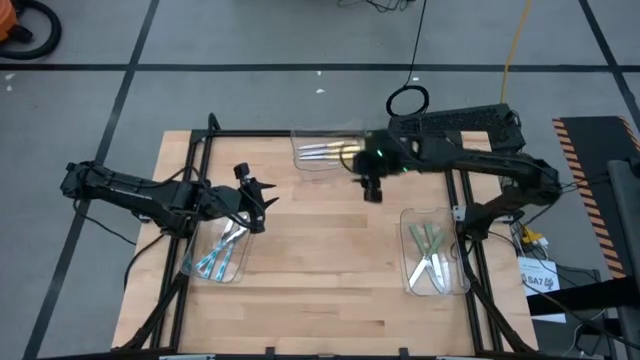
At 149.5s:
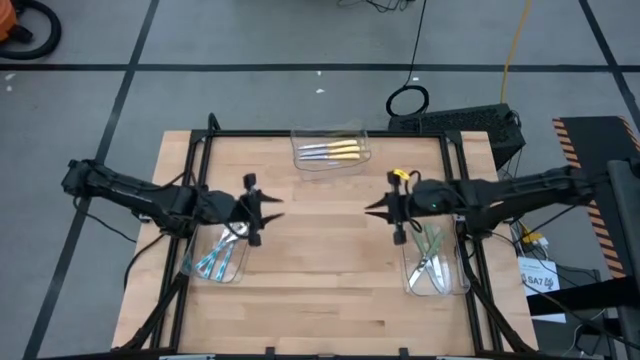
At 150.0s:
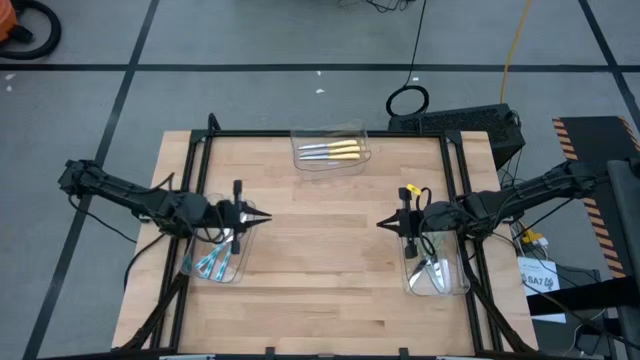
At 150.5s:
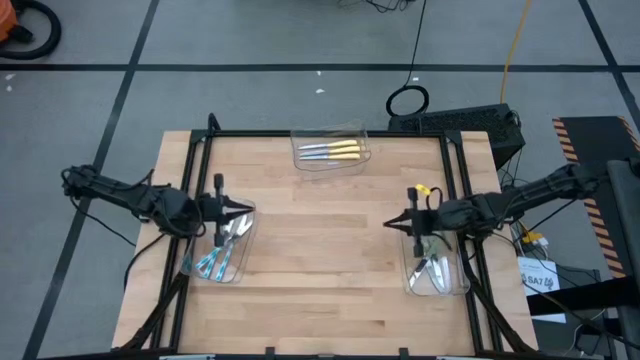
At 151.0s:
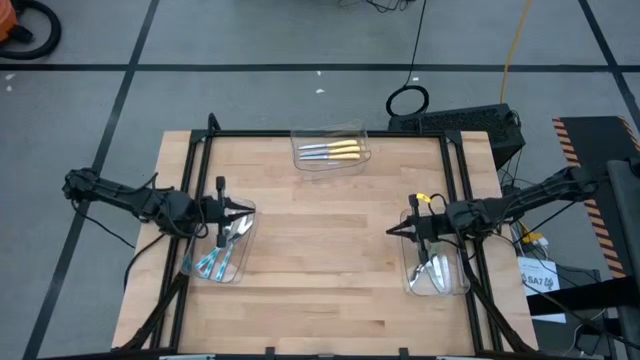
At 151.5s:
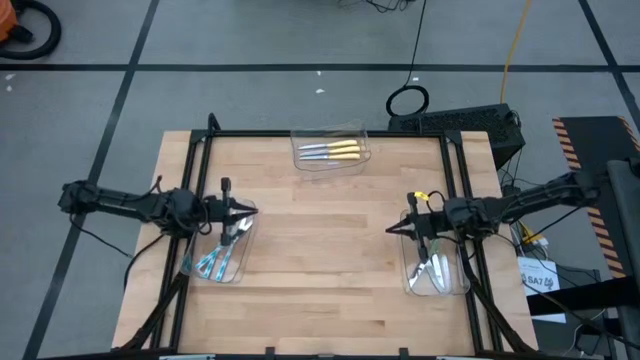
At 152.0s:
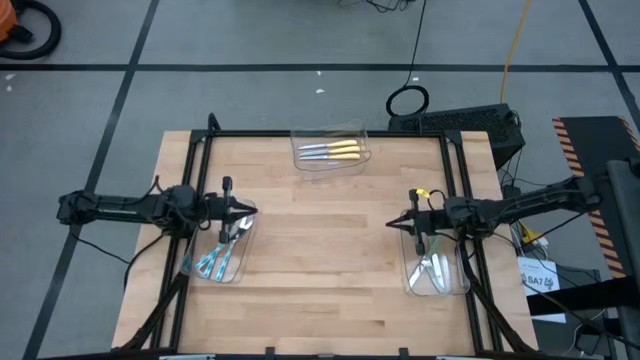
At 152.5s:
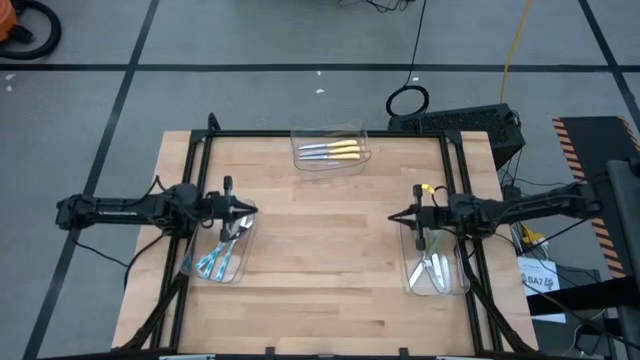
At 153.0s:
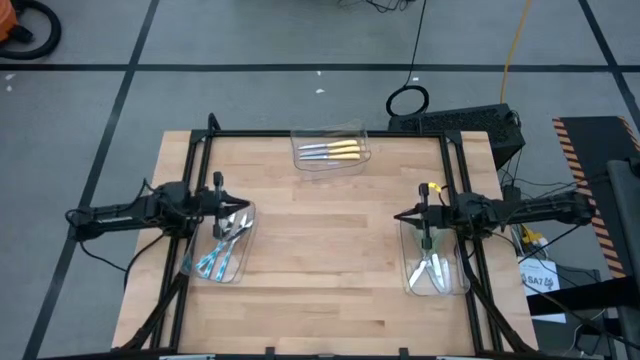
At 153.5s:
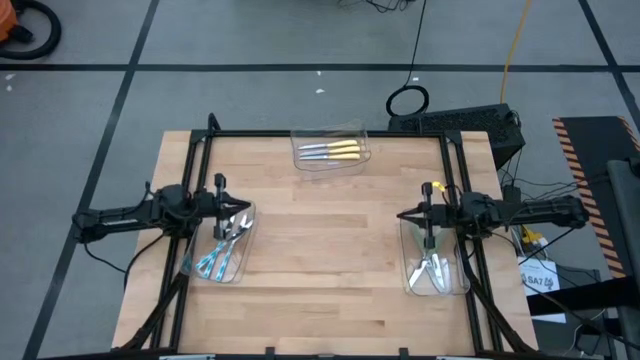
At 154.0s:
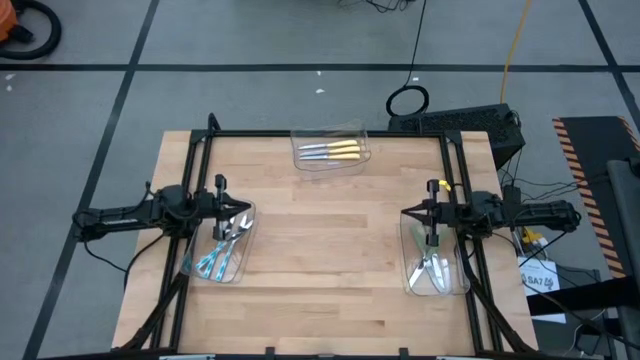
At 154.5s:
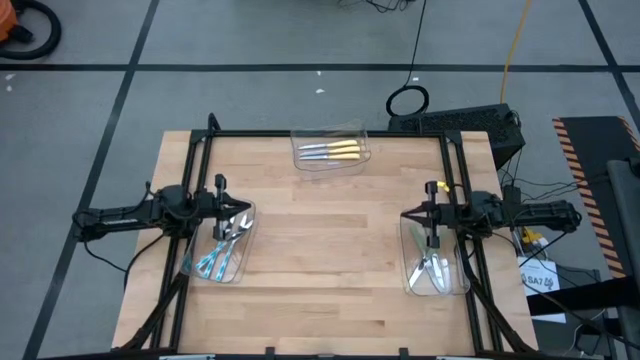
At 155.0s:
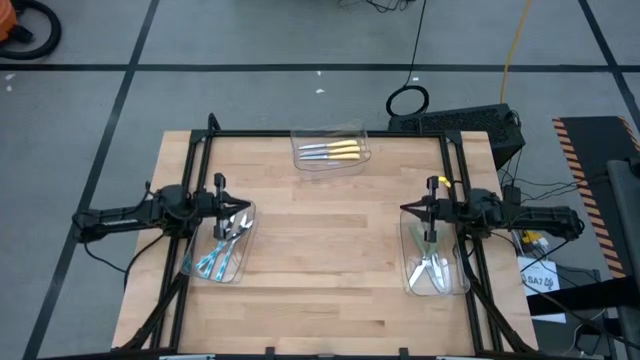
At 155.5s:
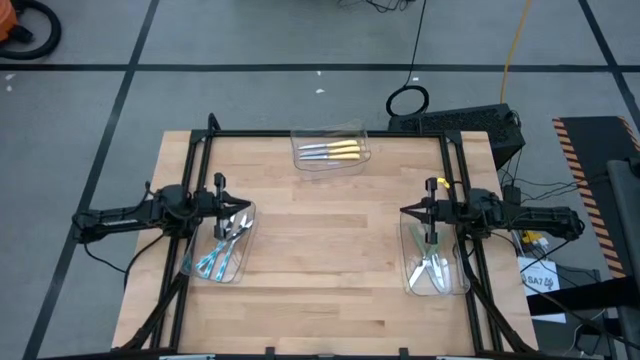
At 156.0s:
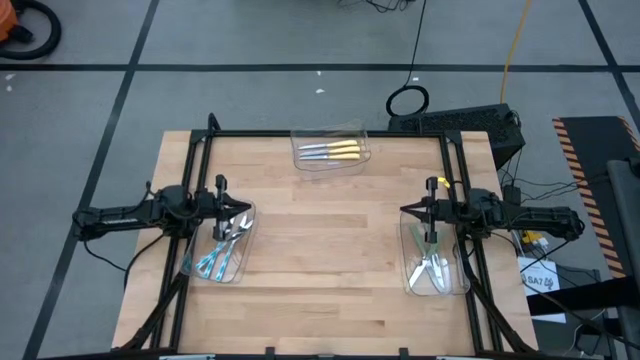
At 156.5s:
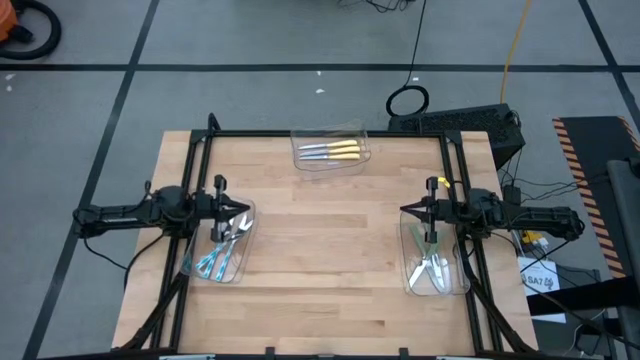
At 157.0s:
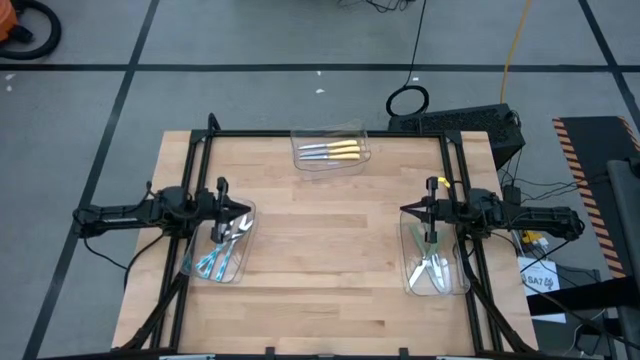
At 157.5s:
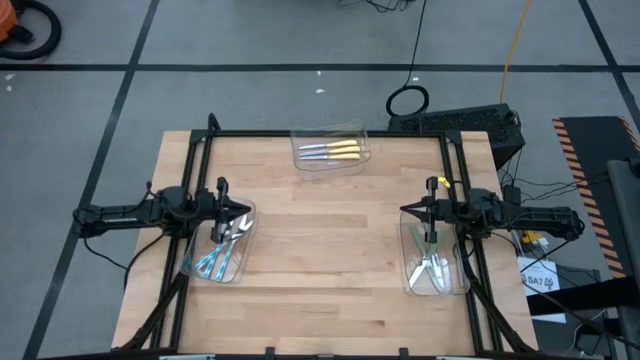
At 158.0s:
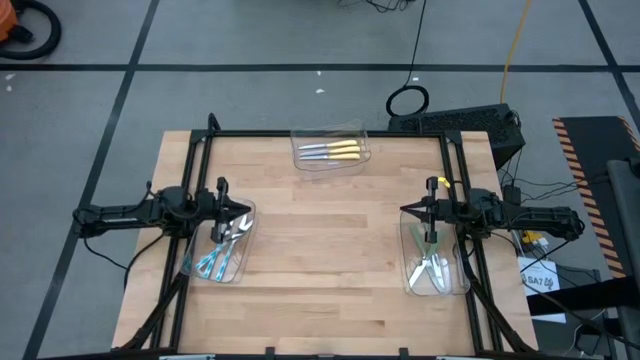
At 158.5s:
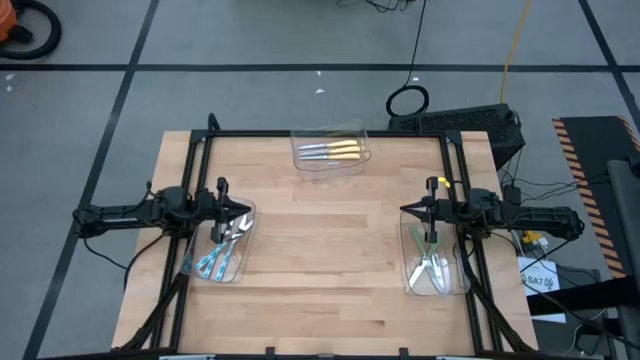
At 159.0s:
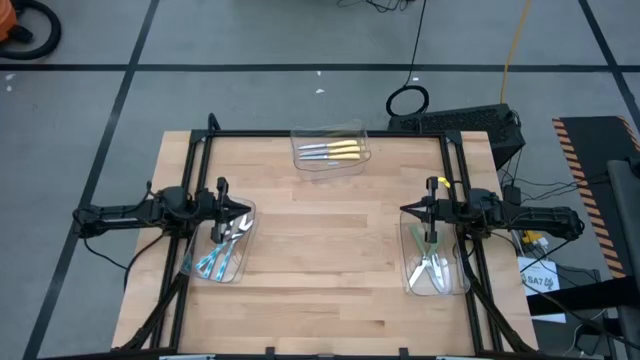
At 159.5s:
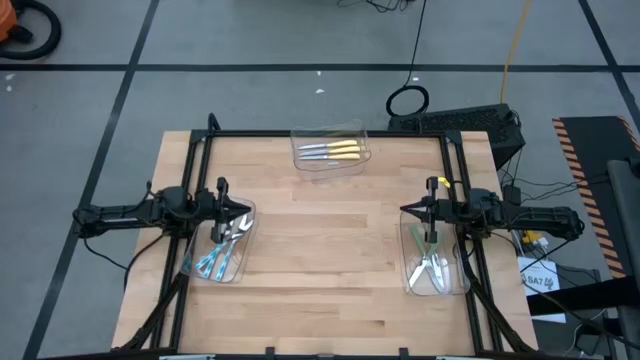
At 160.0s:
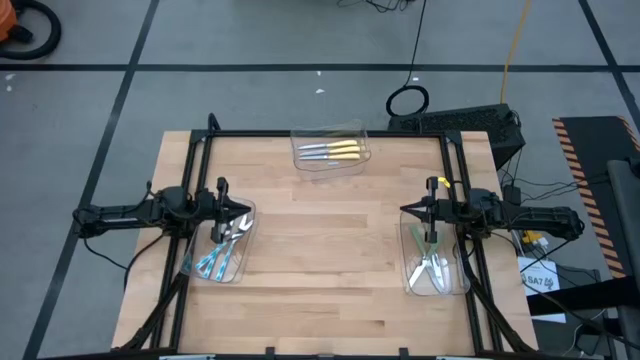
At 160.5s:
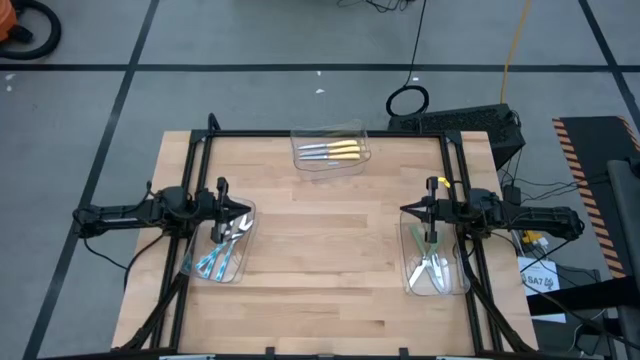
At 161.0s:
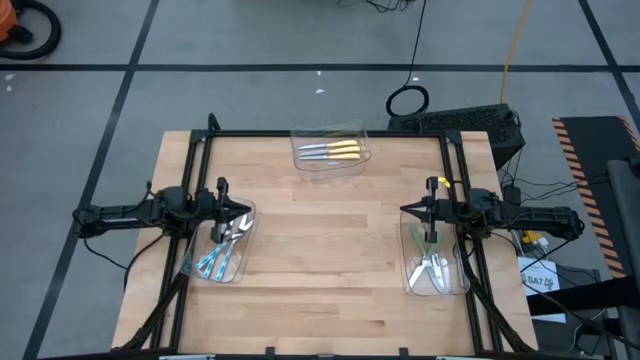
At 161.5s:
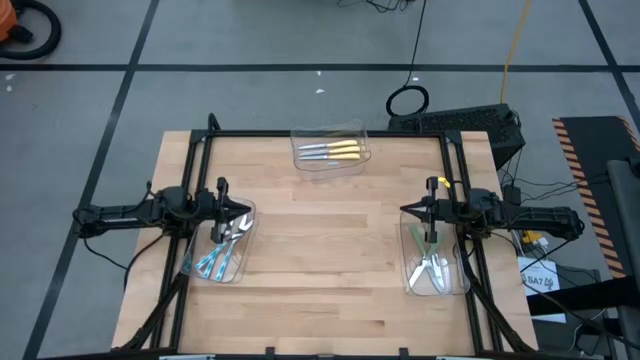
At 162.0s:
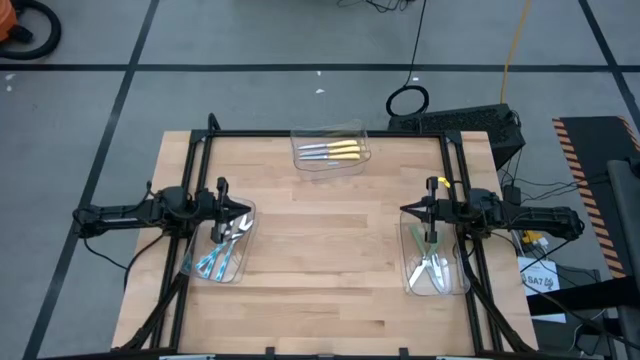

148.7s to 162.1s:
Task: Sort silverware by color (type)
Return to Home Position

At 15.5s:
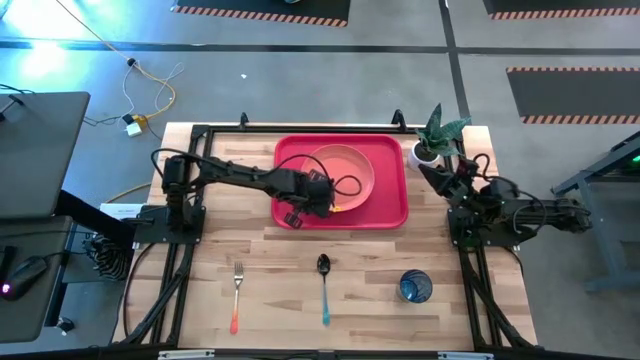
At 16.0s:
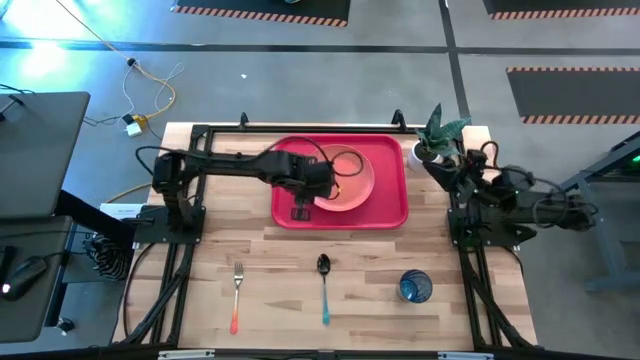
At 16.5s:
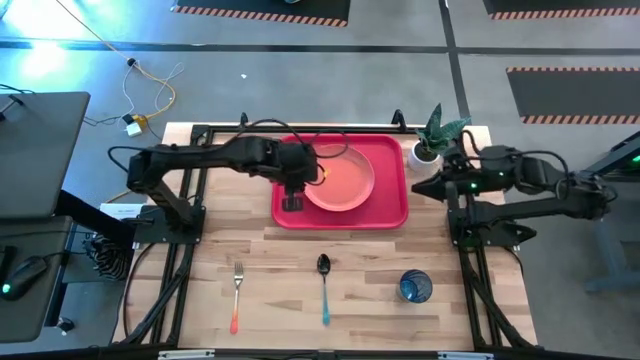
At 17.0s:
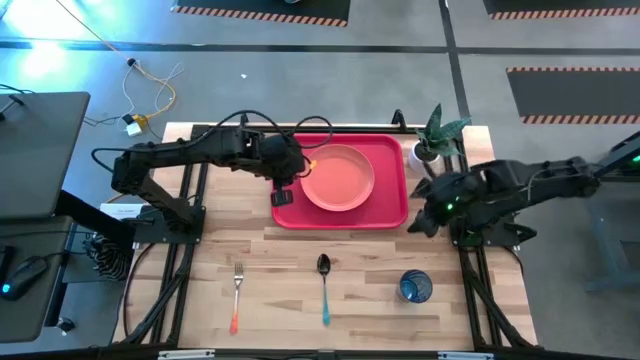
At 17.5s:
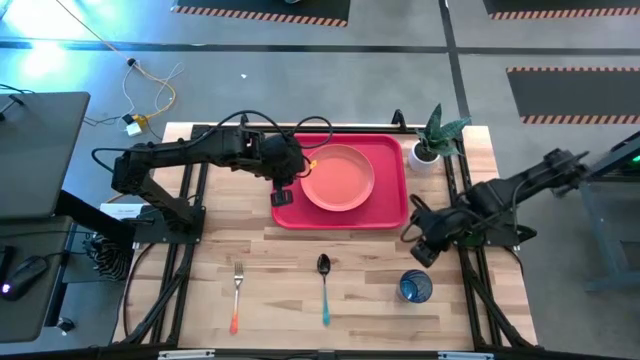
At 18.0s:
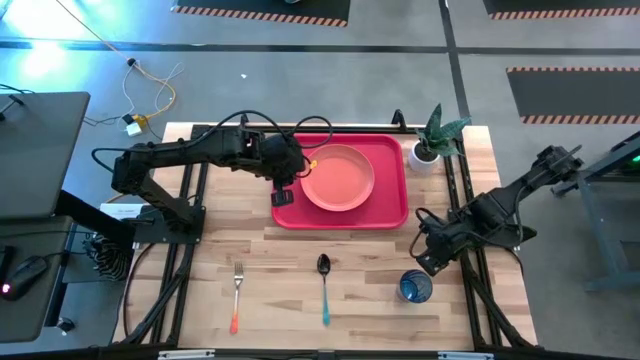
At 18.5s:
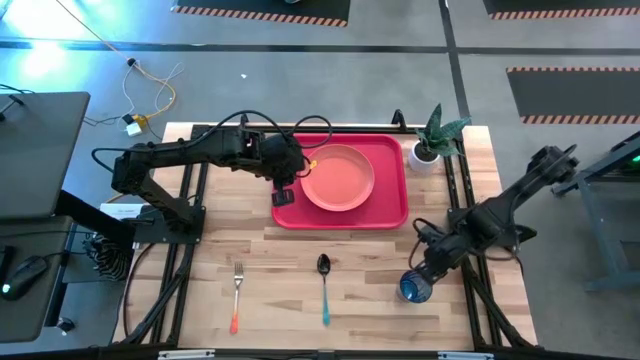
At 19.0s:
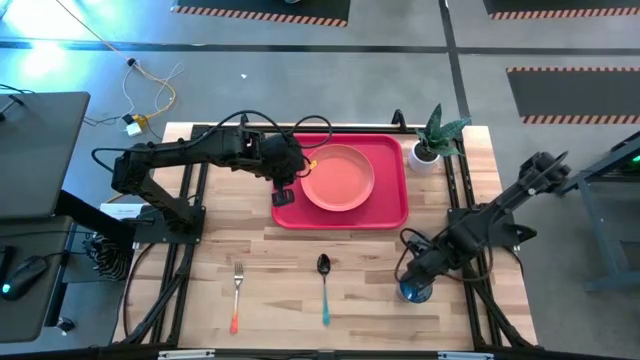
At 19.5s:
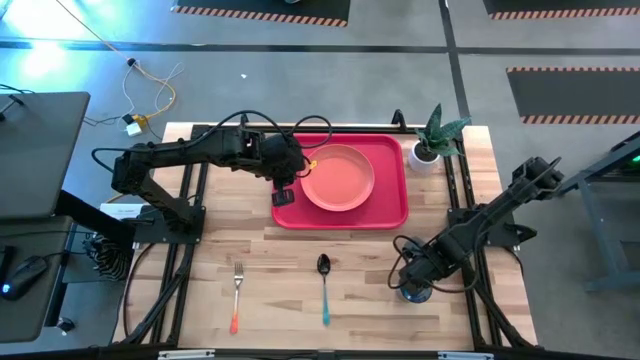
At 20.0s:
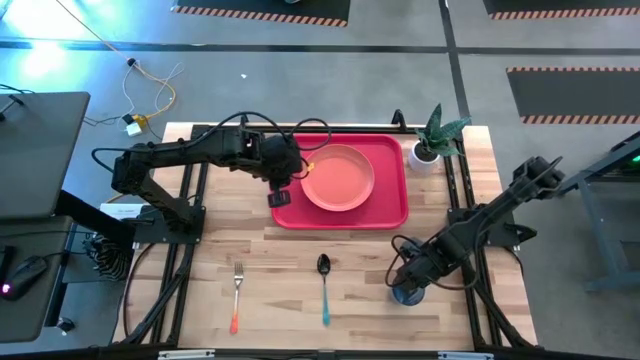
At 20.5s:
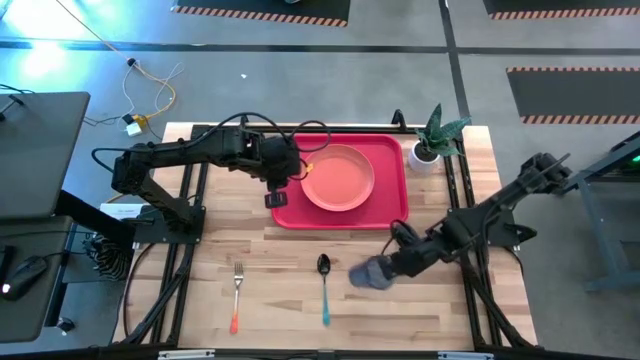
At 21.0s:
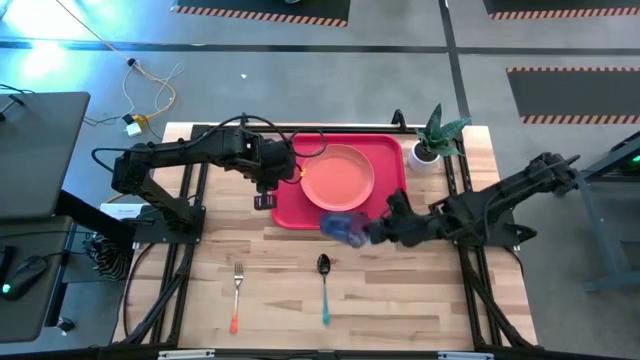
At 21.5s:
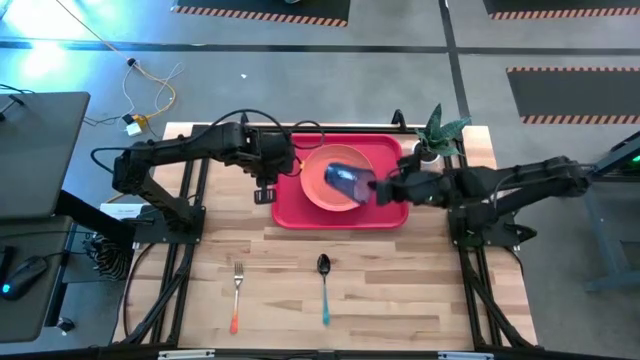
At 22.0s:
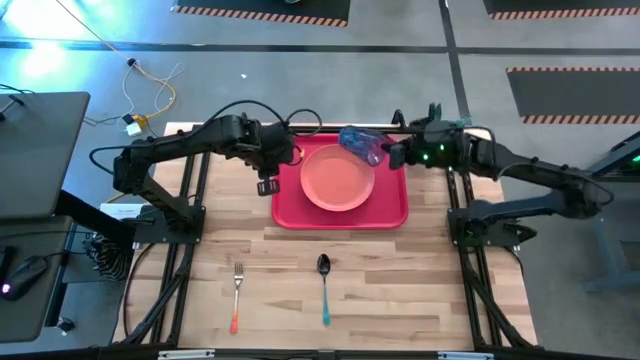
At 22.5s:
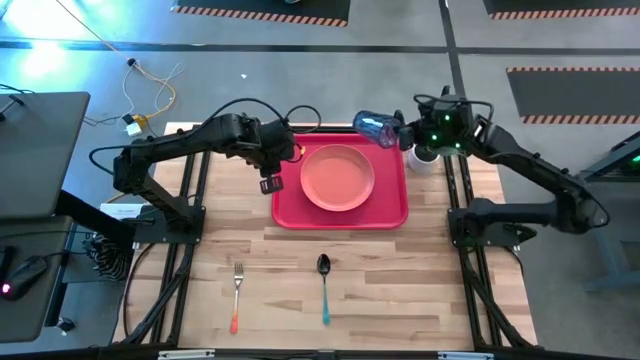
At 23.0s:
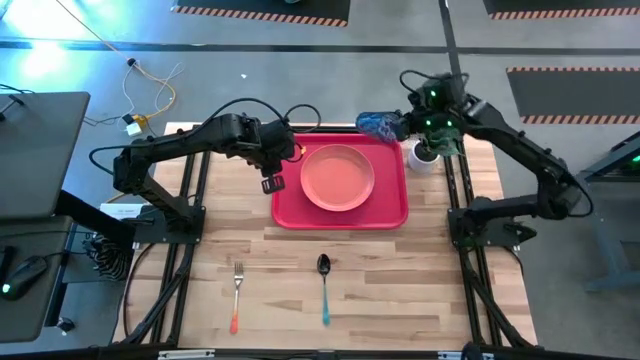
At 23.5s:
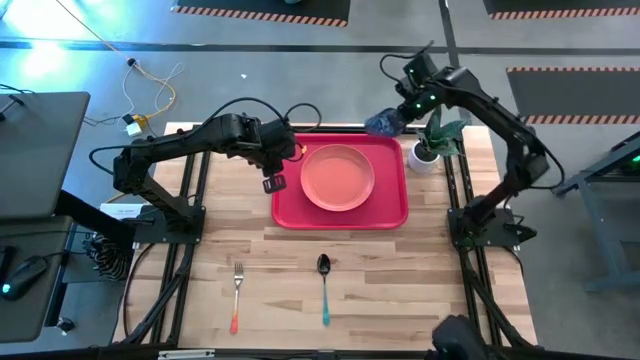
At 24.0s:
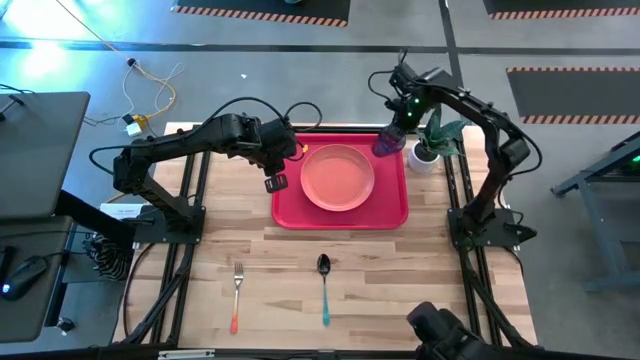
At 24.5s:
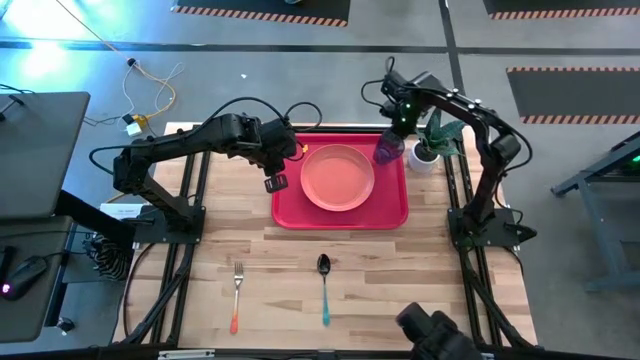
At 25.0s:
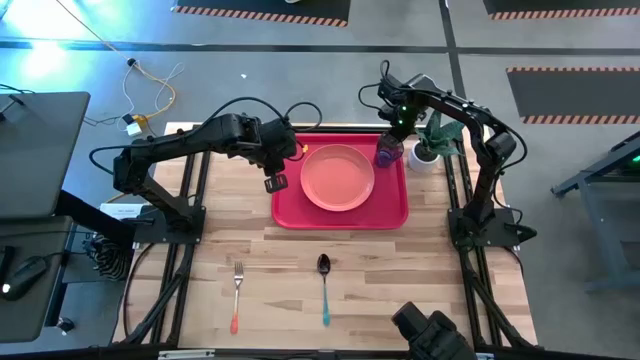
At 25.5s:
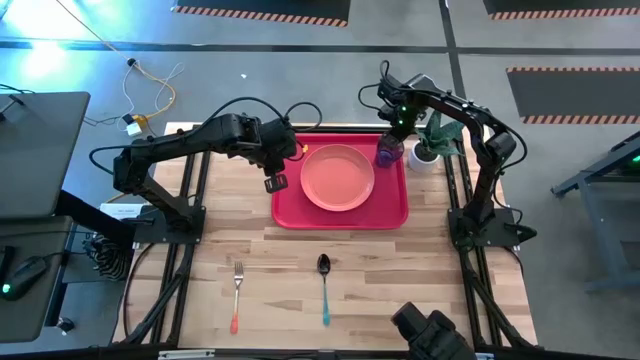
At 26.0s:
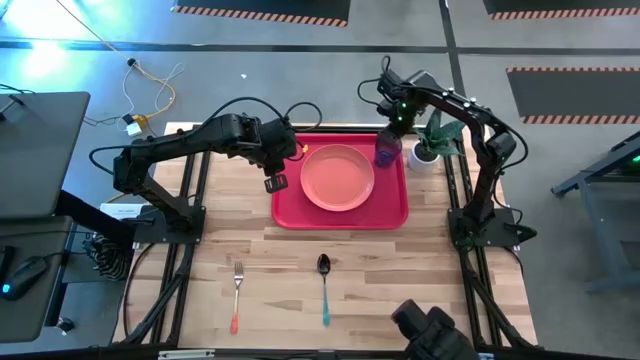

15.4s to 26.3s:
Task: Pick and place plate/cup/fork/spoon on tray
Put the blue cup at the top right of the orange plate on the tray
